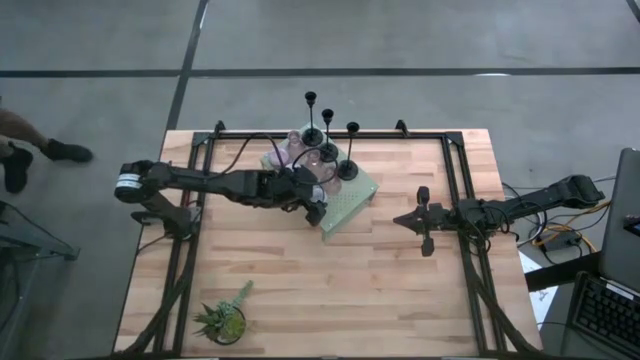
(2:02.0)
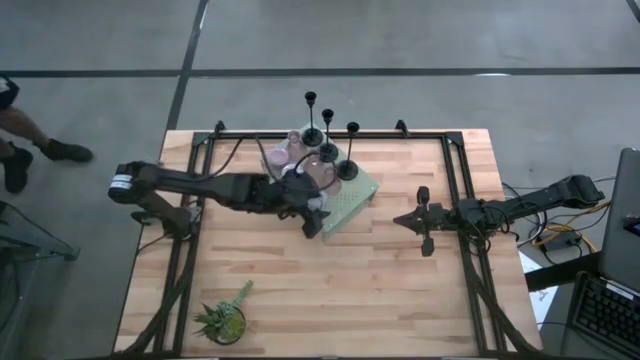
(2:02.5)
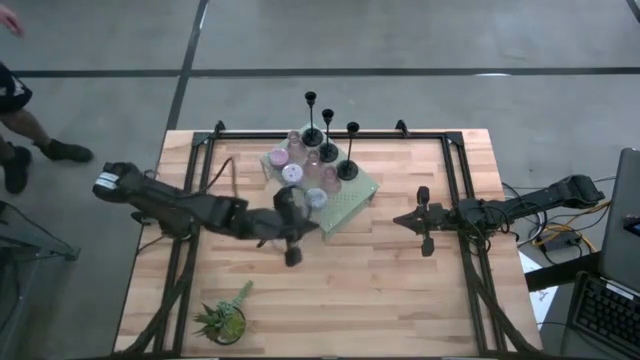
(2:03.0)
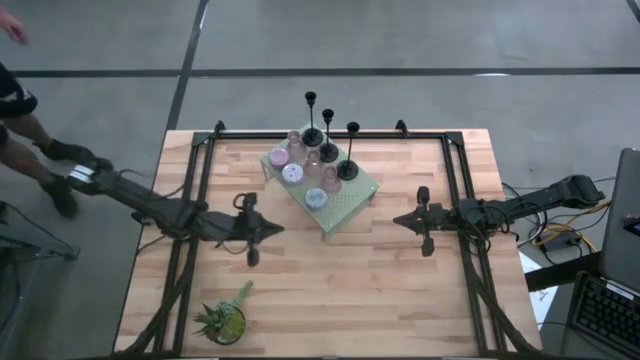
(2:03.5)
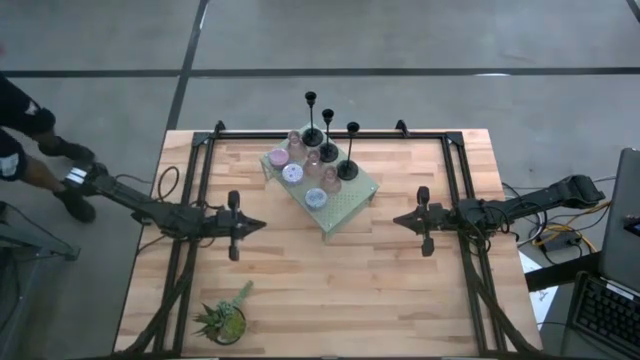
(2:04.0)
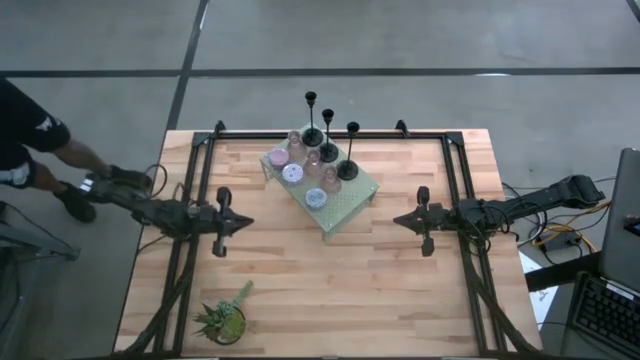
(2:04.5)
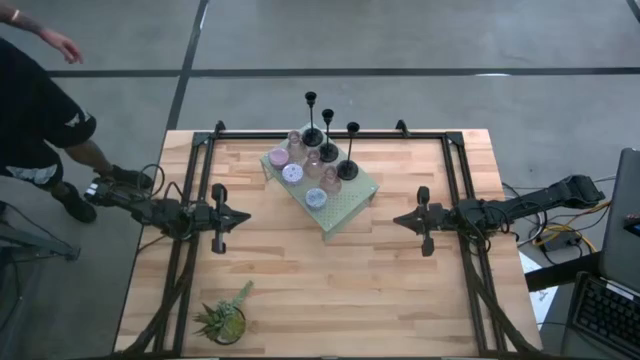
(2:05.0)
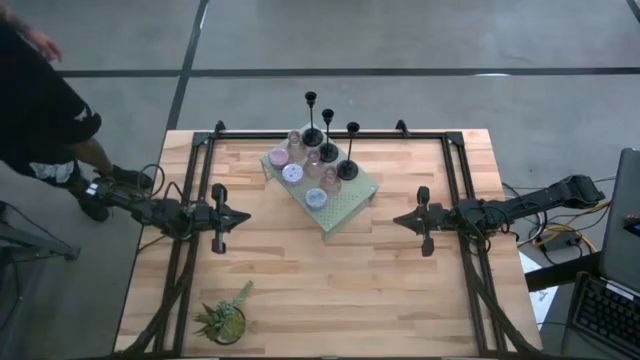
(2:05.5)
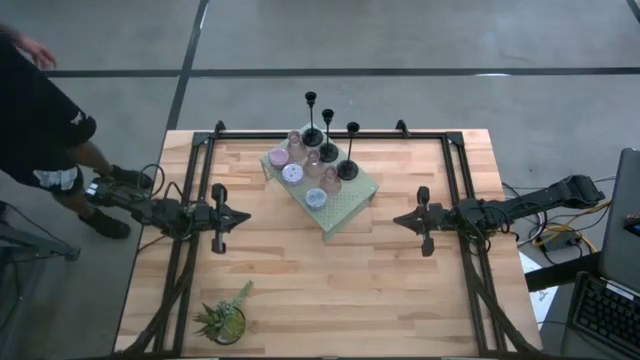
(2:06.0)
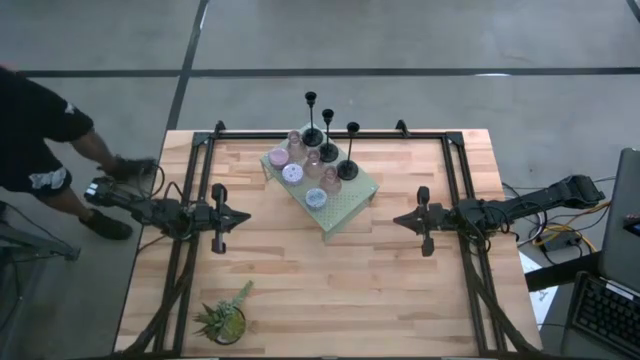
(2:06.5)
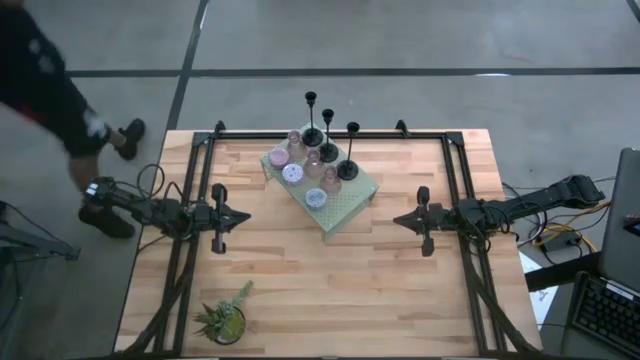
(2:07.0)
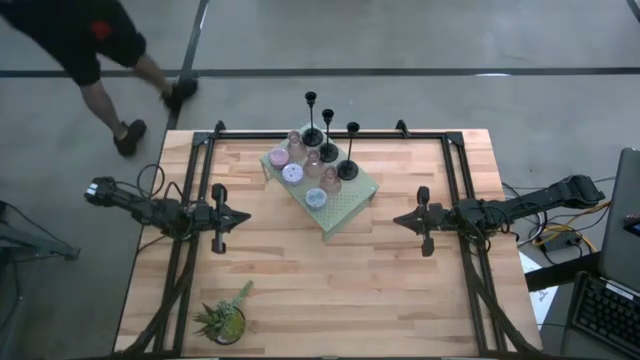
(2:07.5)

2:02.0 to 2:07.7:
Task: Pick & Place candle stick holders
Return to Home Position

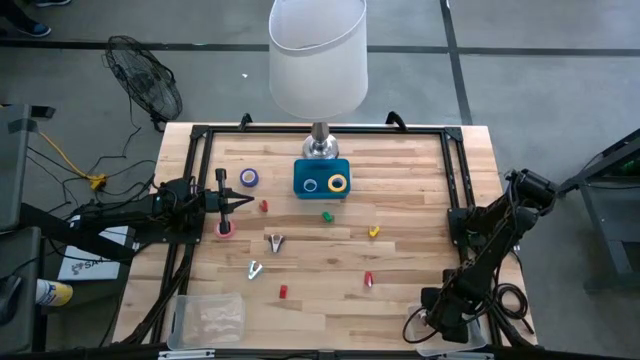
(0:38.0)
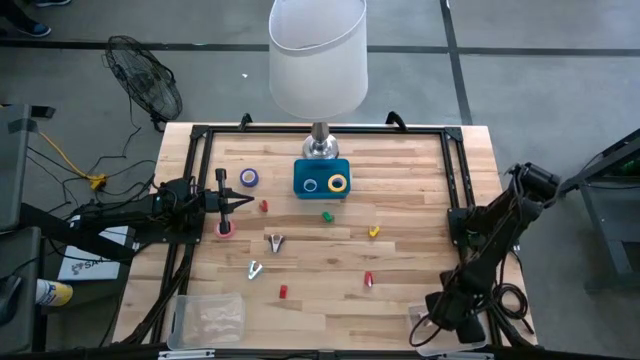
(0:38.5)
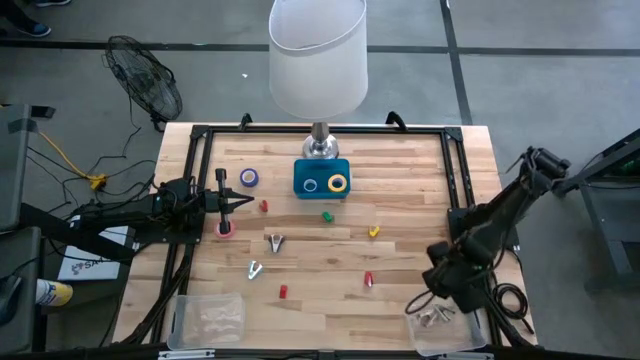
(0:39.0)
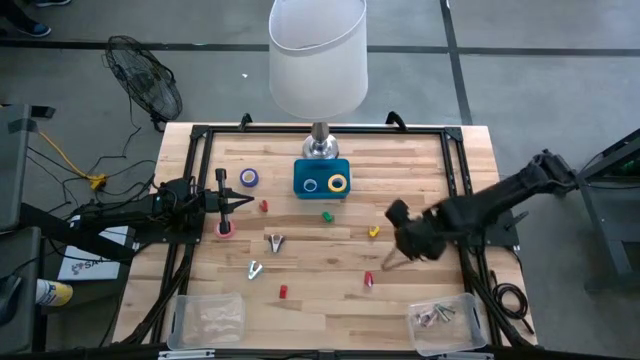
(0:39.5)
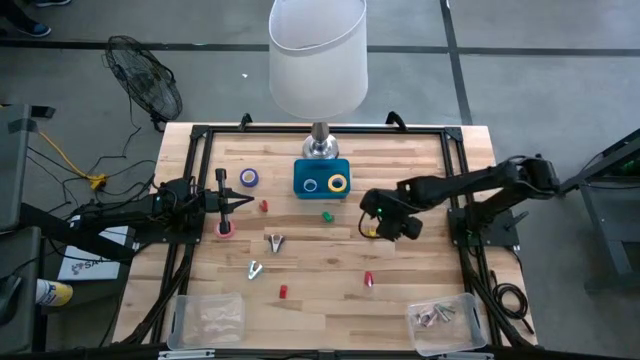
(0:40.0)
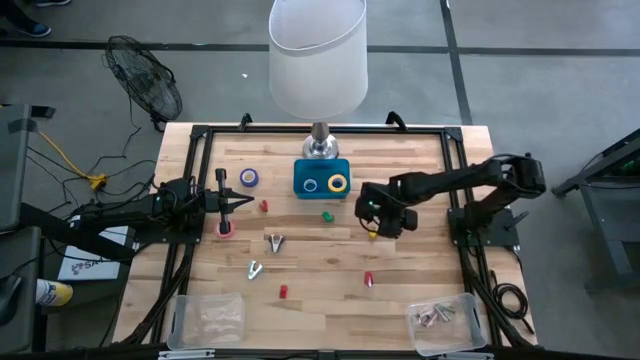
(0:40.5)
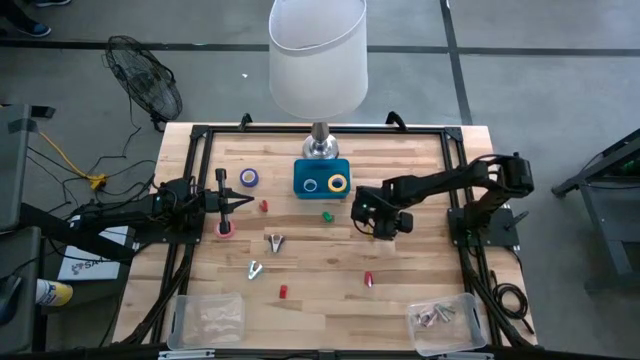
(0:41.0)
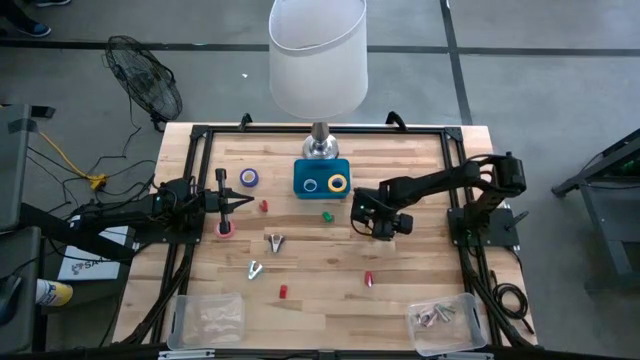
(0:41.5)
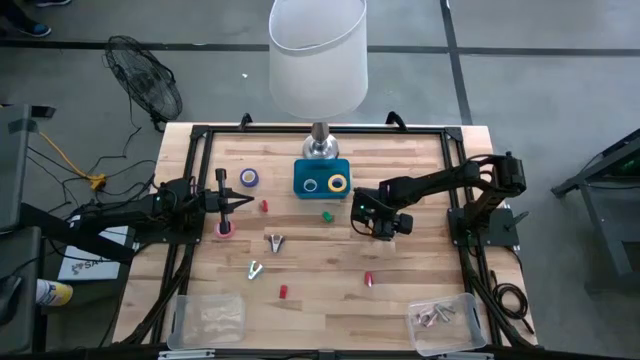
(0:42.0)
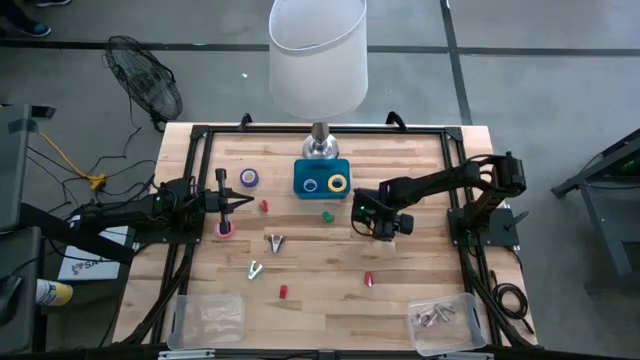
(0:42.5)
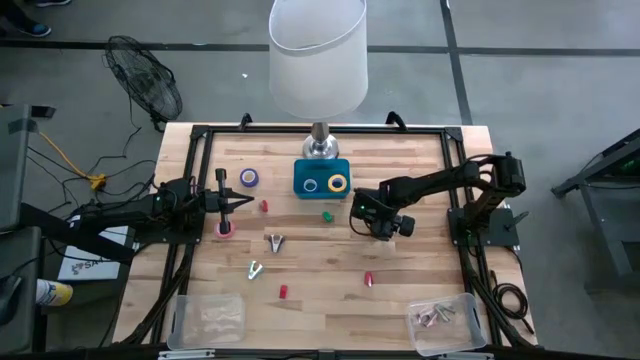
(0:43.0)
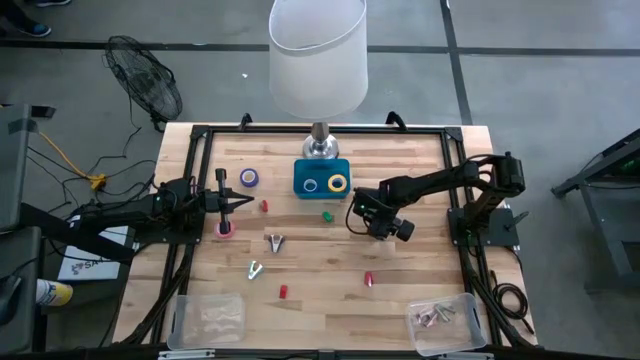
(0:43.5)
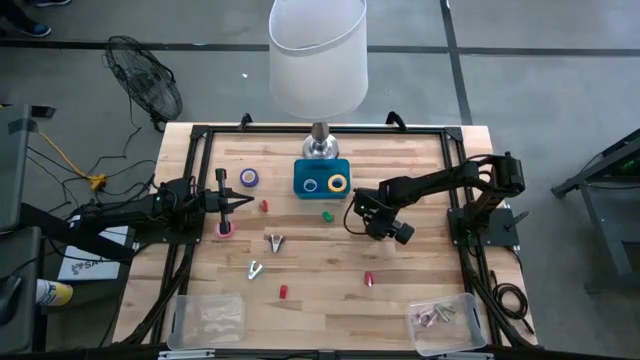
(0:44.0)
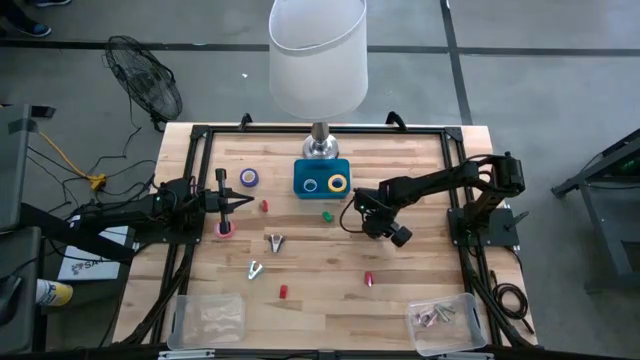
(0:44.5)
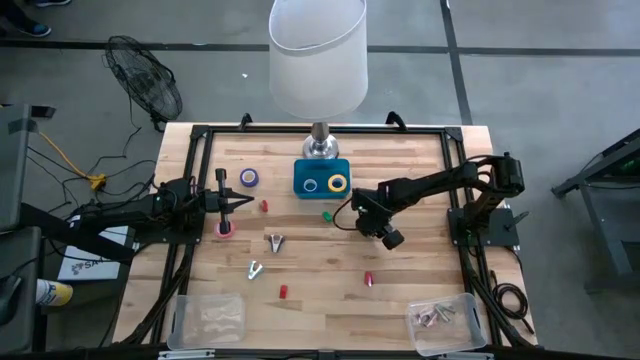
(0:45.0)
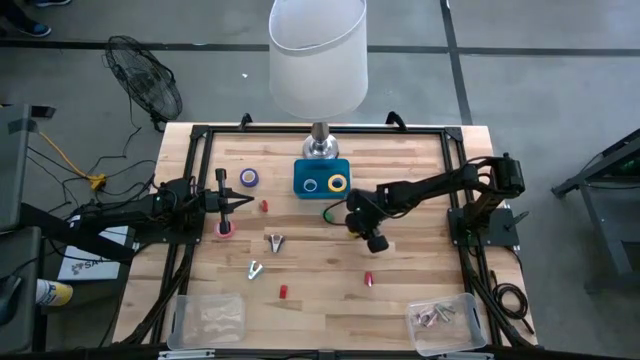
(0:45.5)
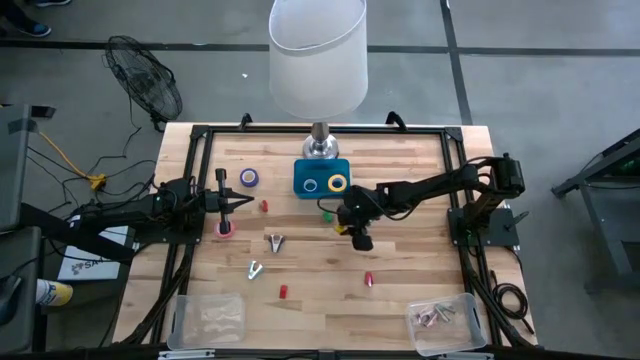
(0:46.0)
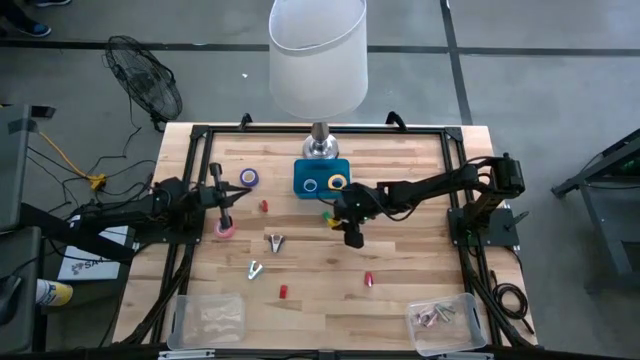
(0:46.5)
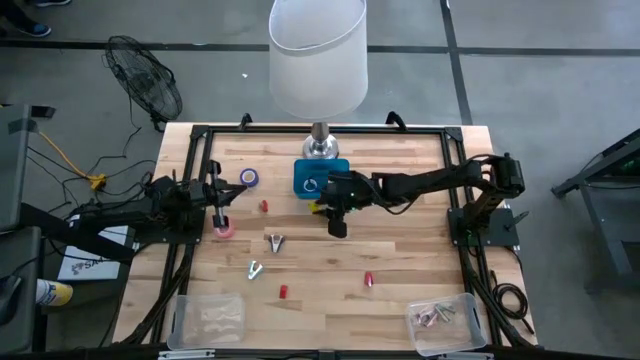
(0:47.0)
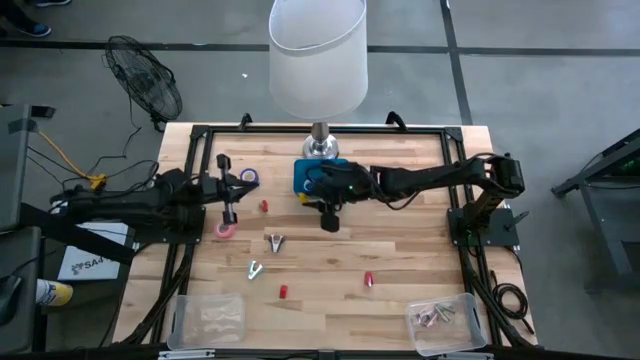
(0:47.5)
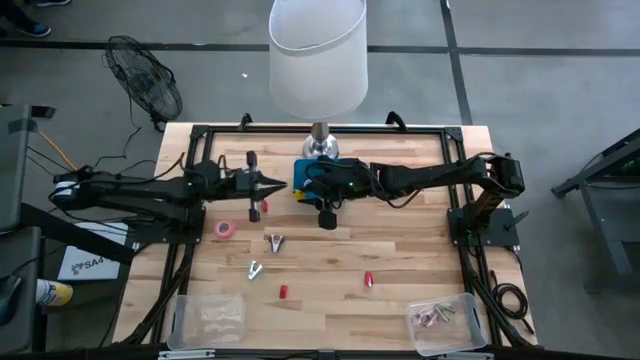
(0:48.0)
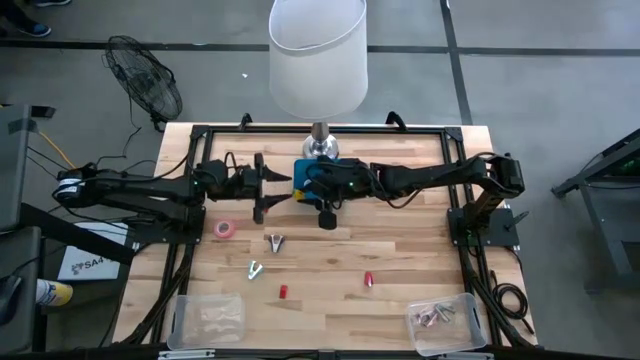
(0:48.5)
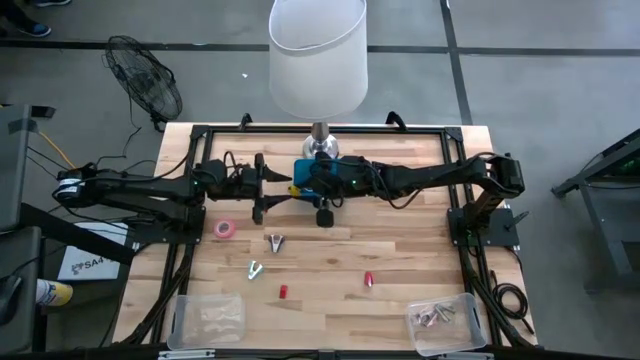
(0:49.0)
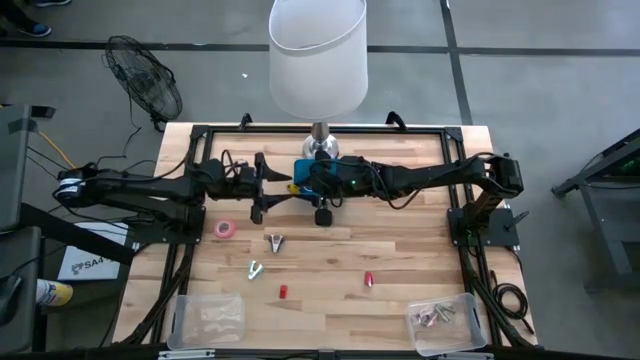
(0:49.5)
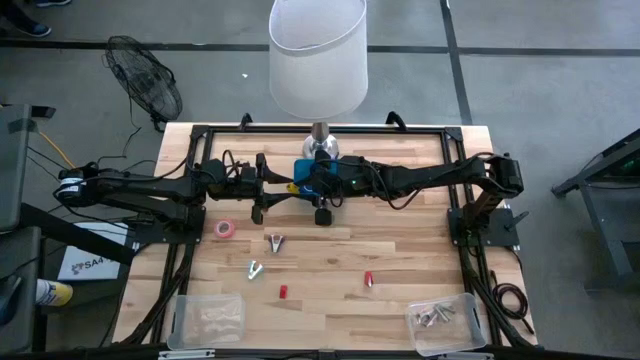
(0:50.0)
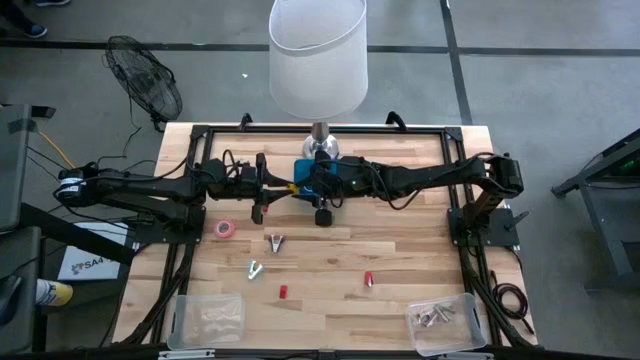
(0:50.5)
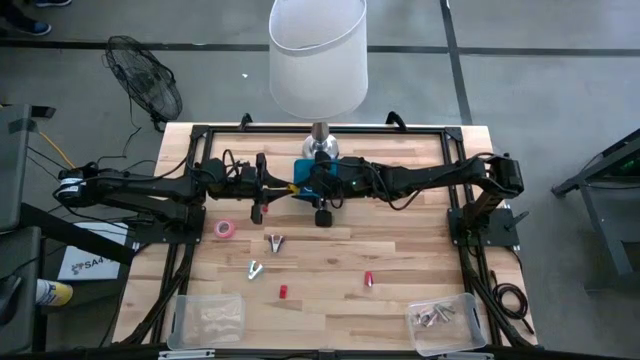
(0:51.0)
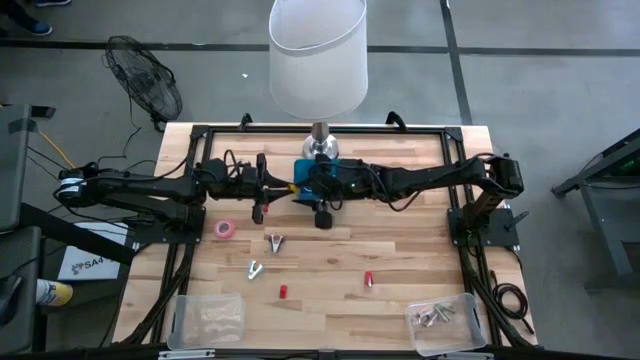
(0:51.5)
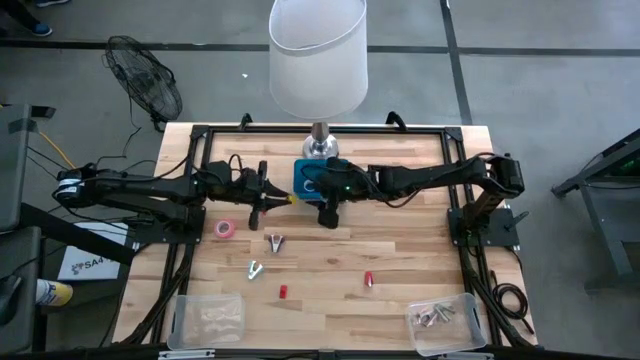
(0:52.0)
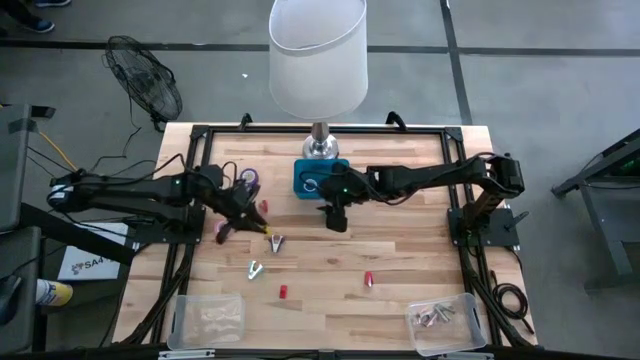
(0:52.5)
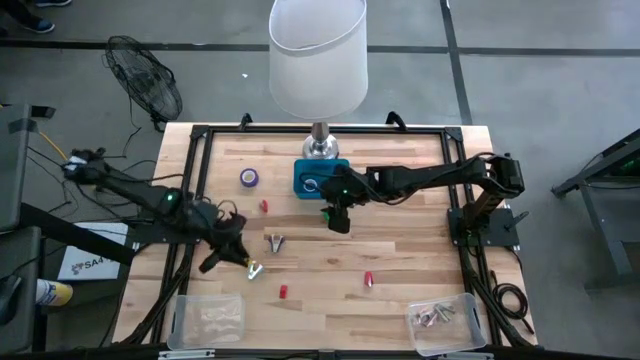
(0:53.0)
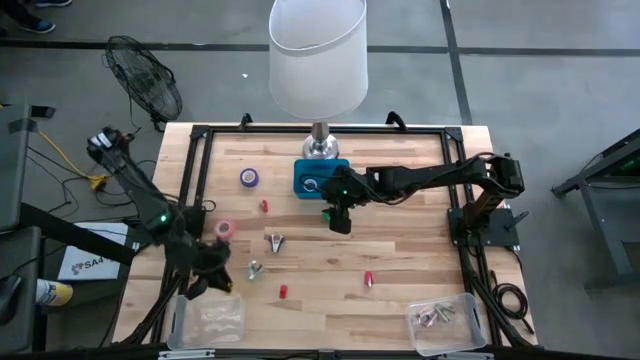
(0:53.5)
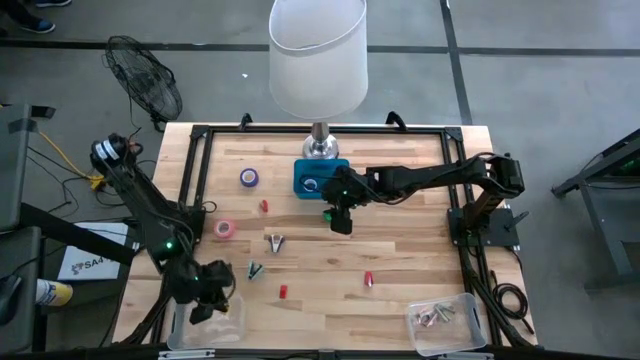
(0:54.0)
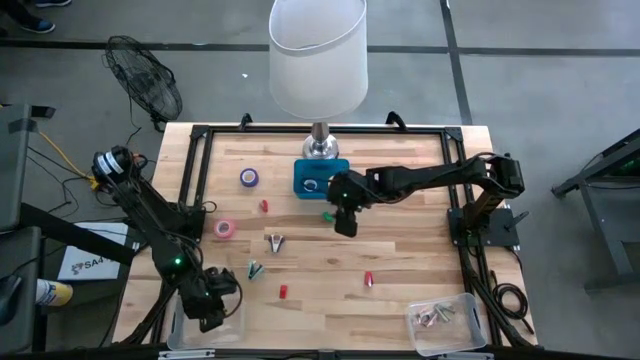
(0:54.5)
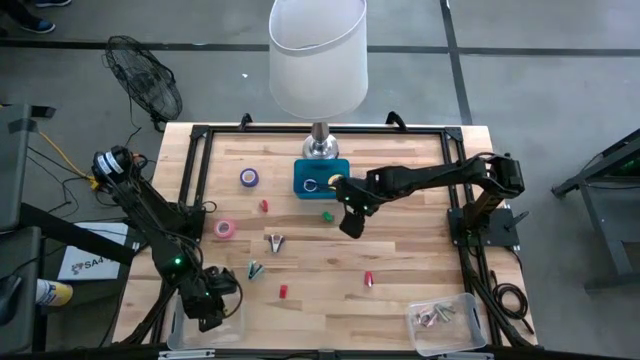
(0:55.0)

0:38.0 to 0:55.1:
Task: Pick and place Stapler, Stapler remover, tape
Put the yellow stapler into the left transparent bin
